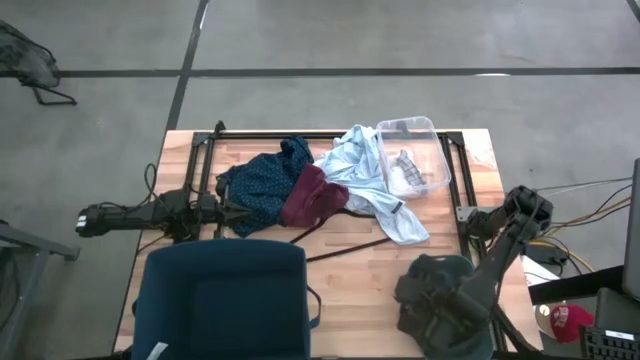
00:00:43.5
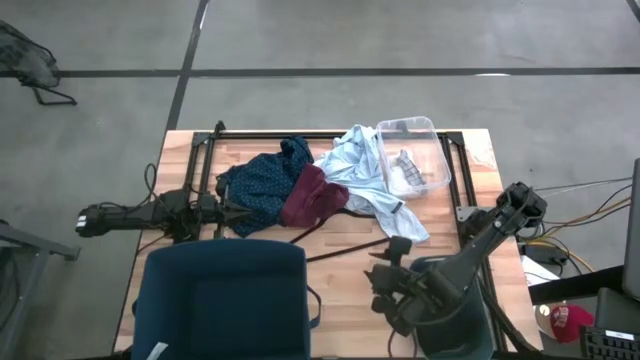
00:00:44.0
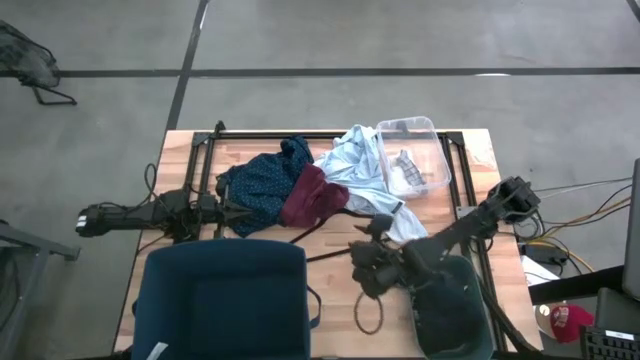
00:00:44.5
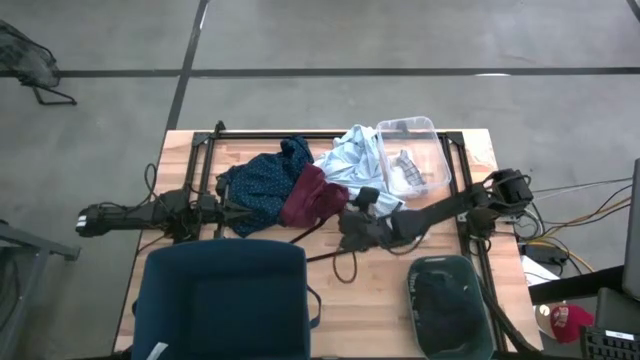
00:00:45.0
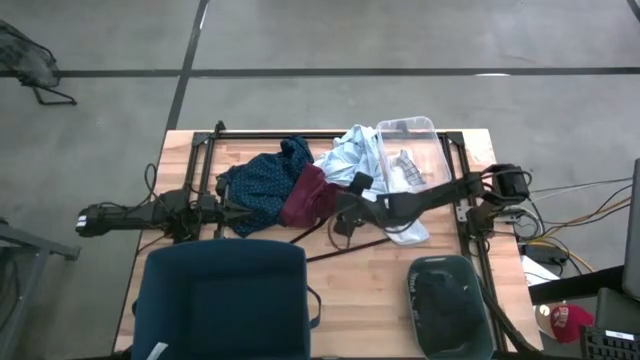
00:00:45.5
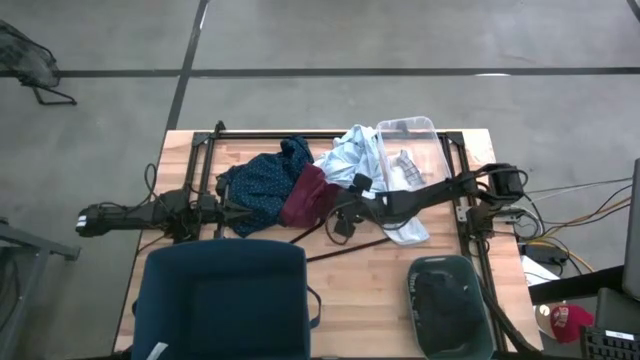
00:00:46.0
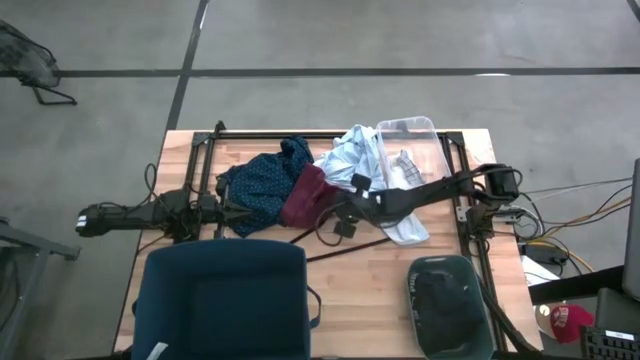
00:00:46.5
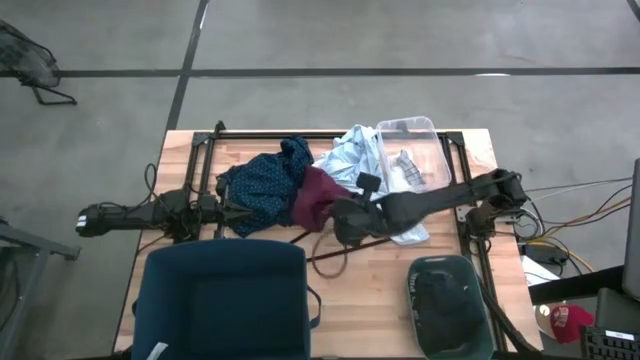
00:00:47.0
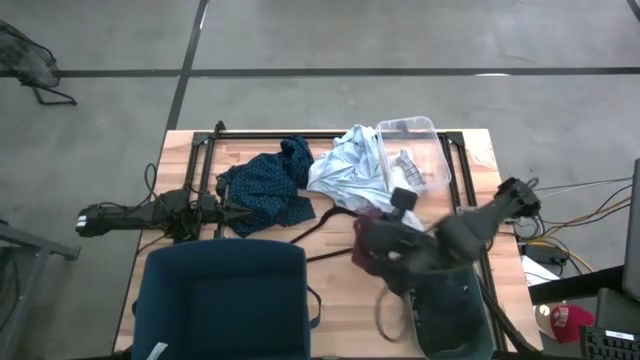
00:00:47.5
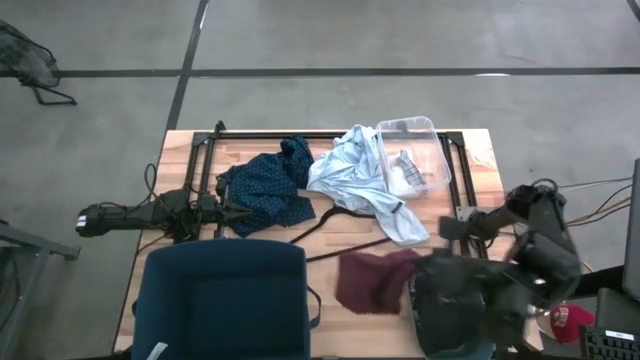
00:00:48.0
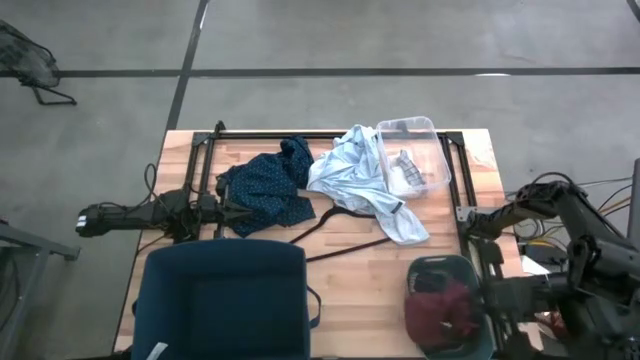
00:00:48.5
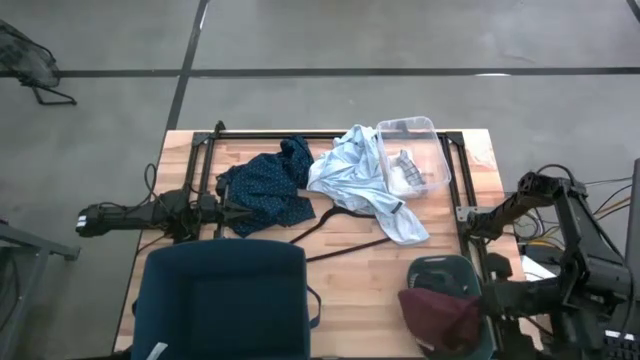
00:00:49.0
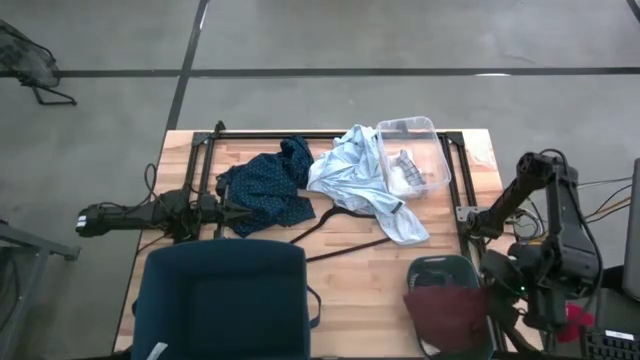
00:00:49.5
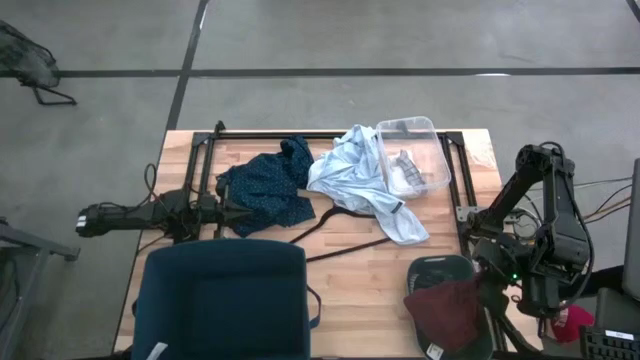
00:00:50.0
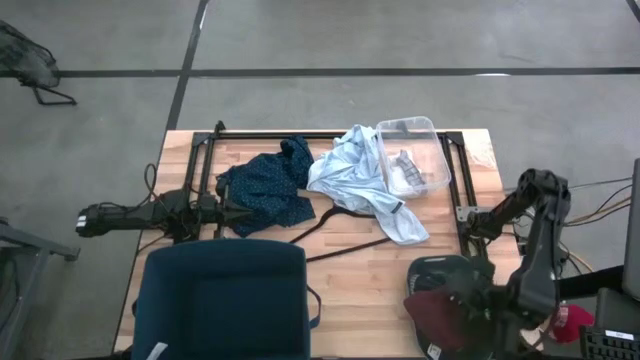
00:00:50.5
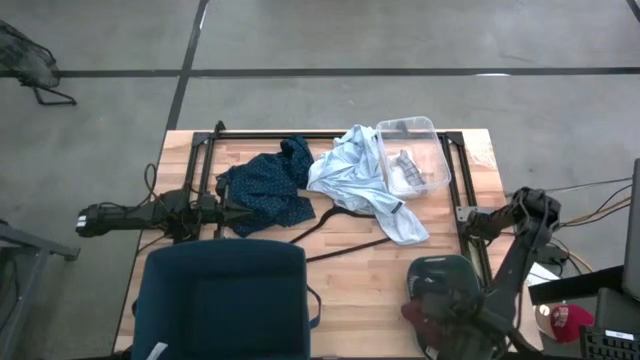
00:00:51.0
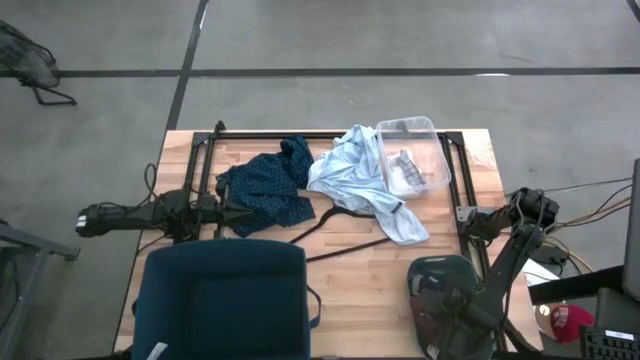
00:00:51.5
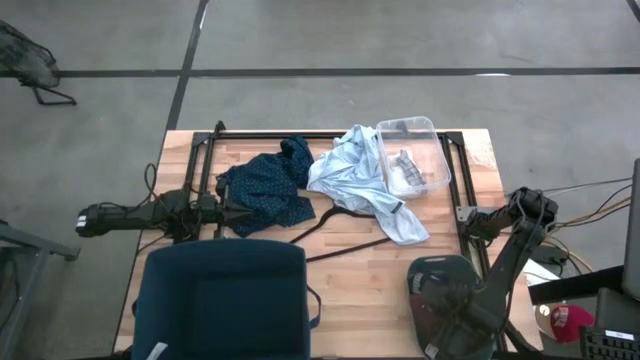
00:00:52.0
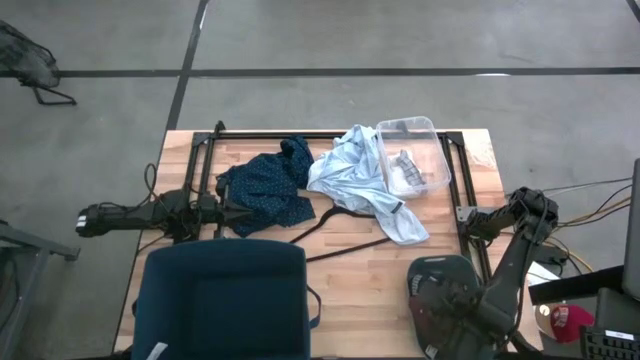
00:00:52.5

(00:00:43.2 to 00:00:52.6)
Task: Pick & Place Cloths
Put the brown underwear into the small blue container

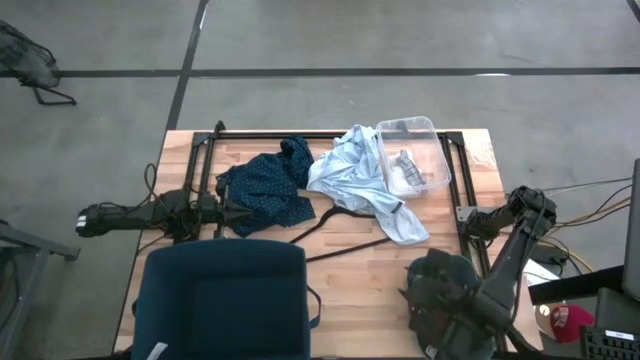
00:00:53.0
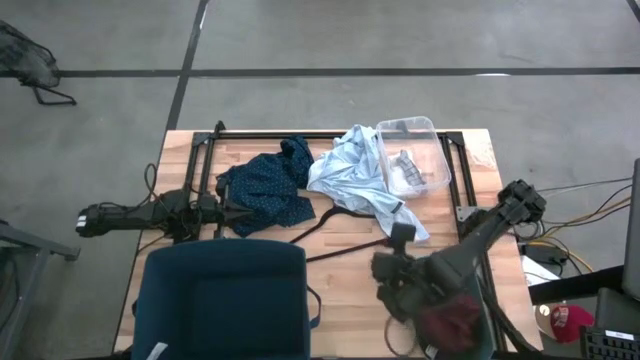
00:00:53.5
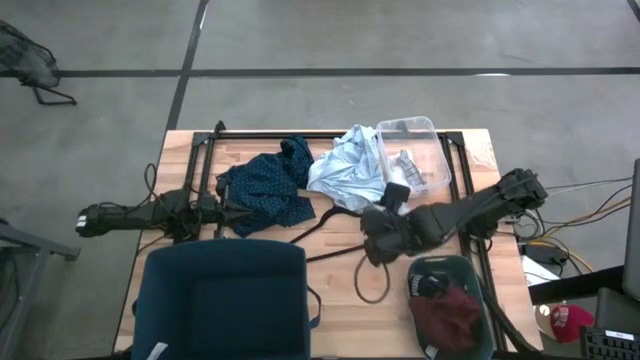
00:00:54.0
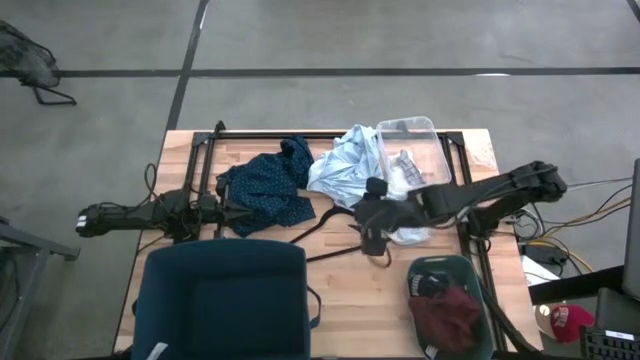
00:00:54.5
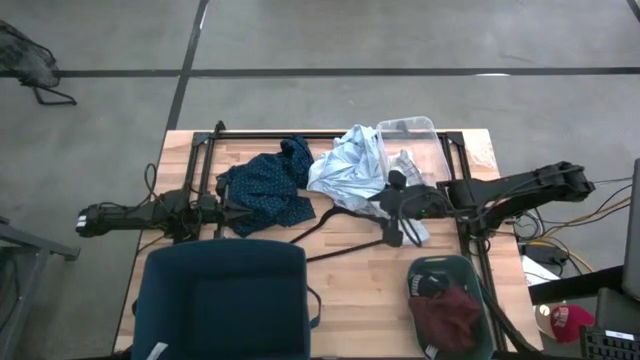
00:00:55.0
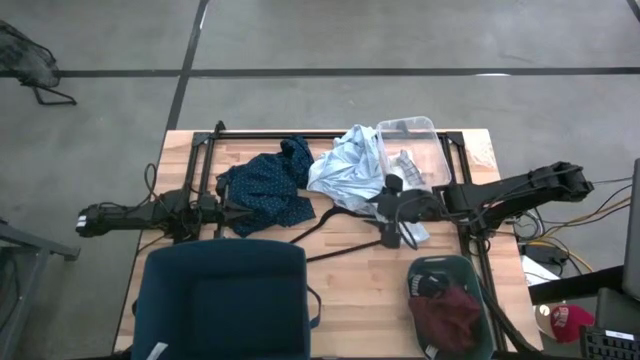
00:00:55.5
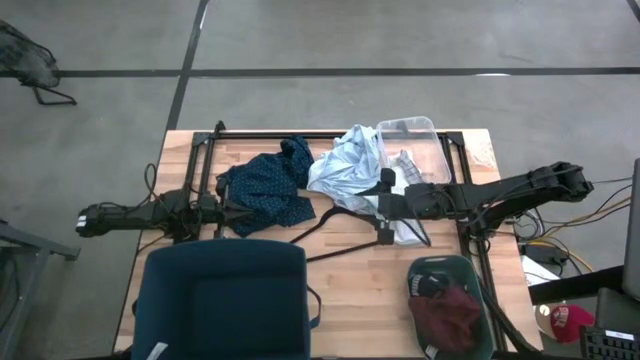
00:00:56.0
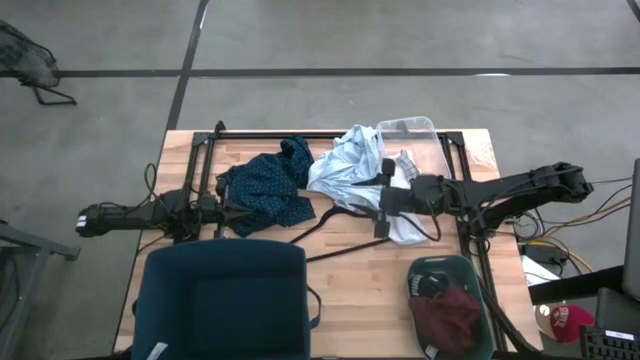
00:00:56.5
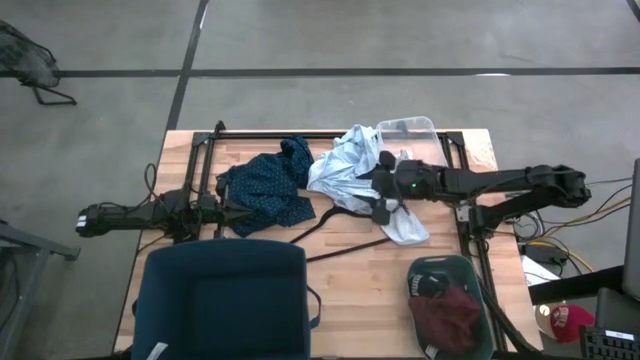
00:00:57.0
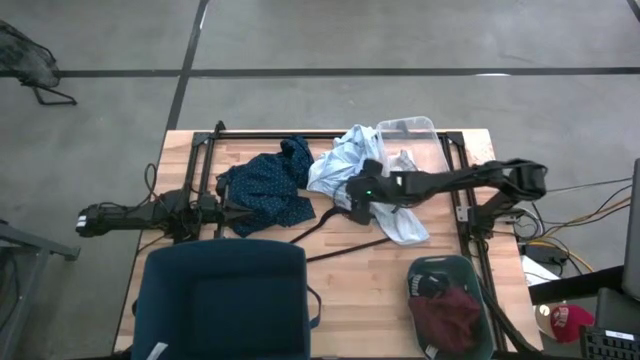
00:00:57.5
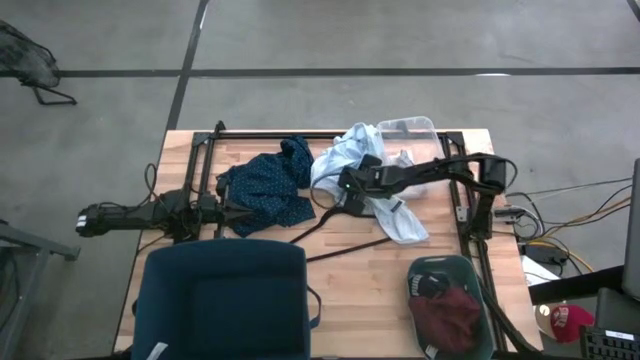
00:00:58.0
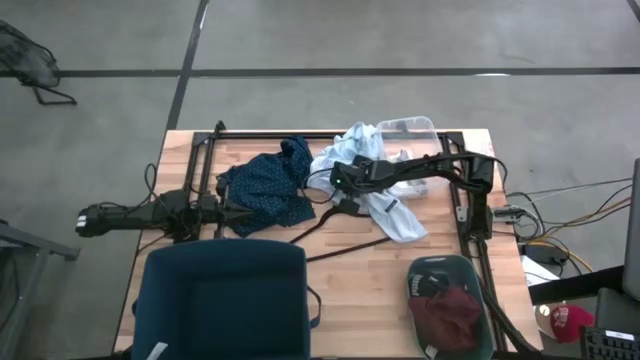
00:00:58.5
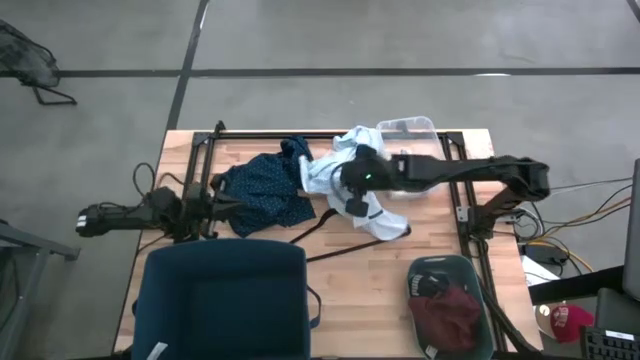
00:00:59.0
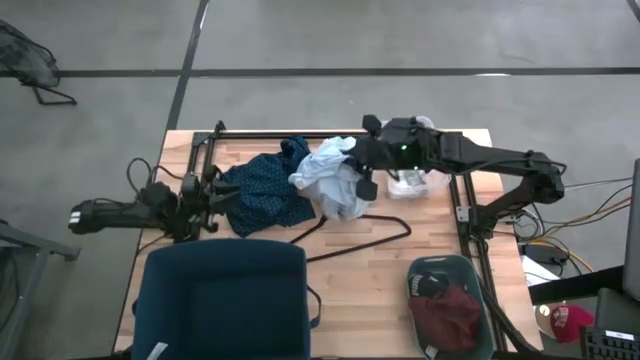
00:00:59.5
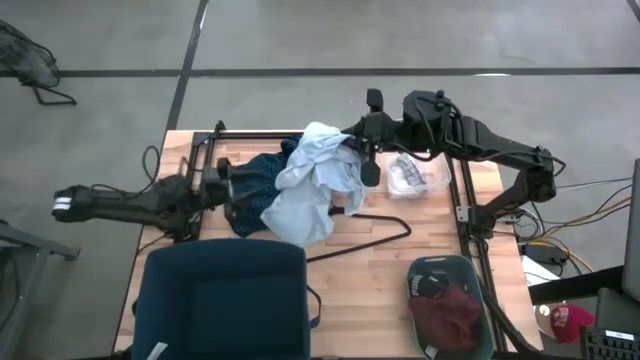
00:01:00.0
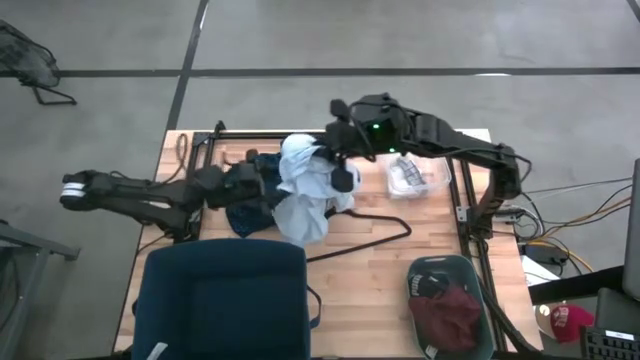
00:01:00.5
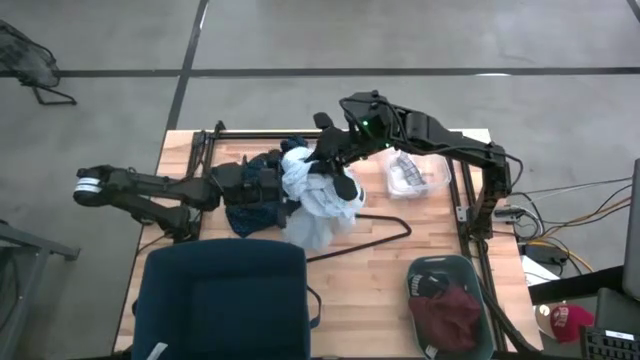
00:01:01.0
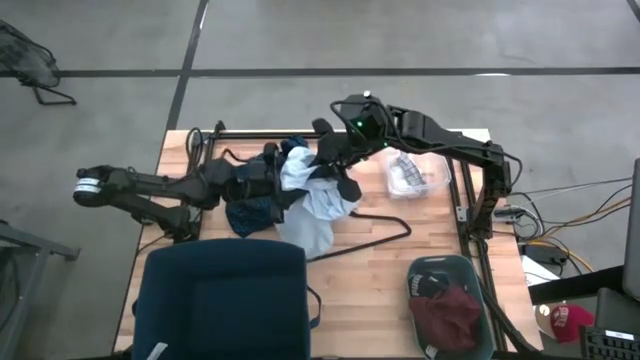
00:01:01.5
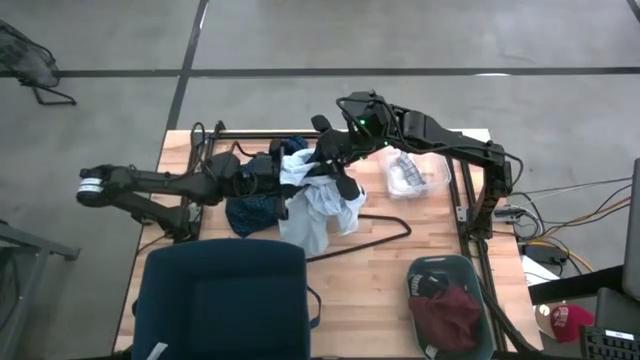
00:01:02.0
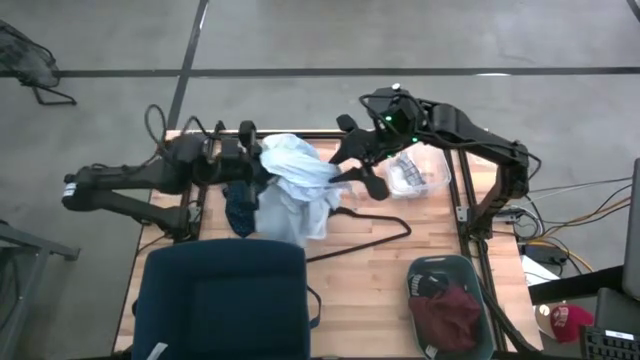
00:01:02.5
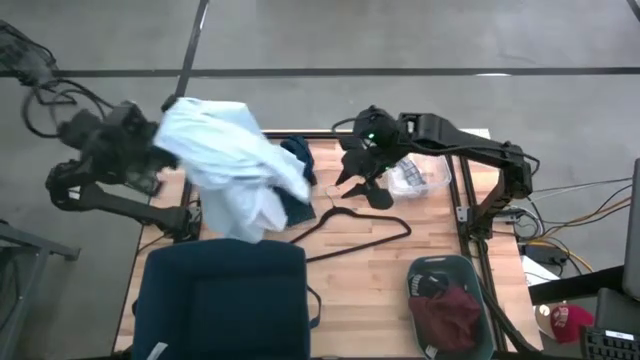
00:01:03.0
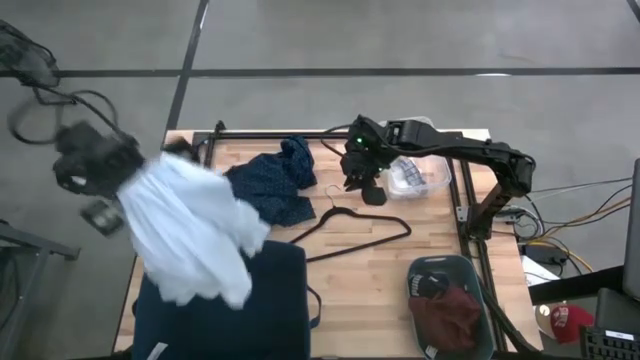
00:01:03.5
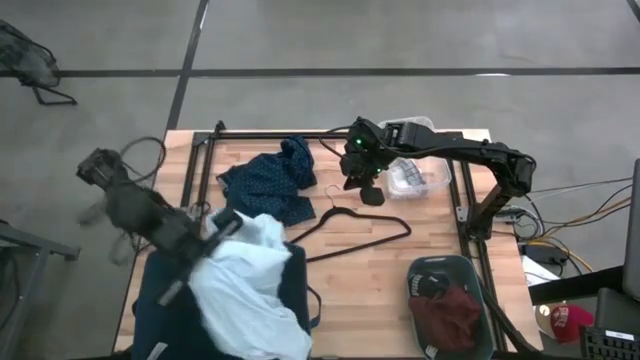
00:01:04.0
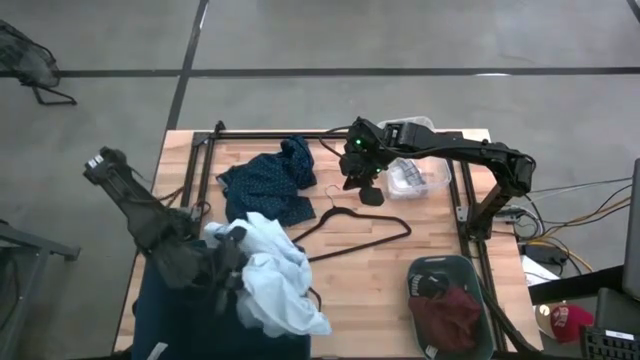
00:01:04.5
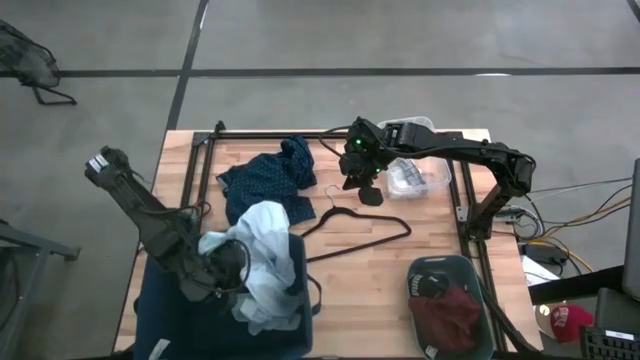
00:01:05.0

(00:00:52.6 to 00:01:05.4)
Put the white shirt into the blue laundry bin
